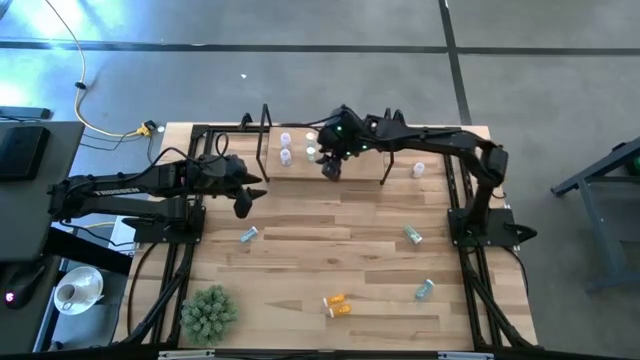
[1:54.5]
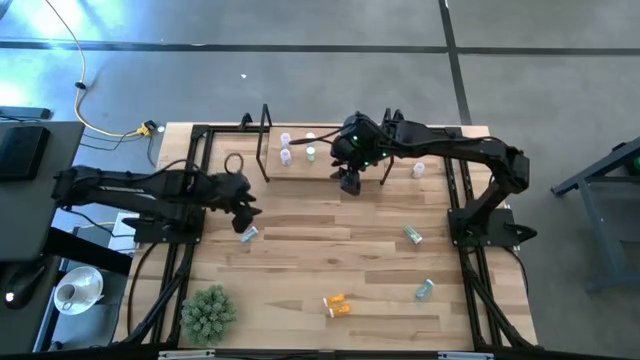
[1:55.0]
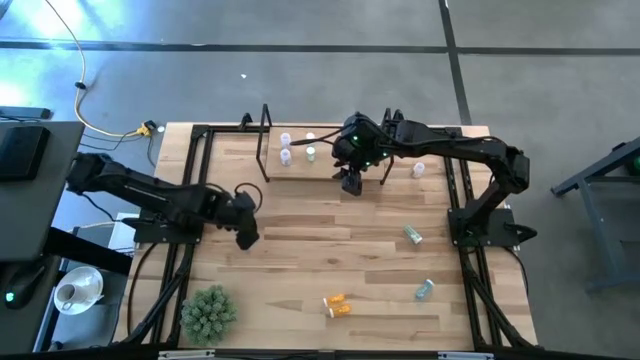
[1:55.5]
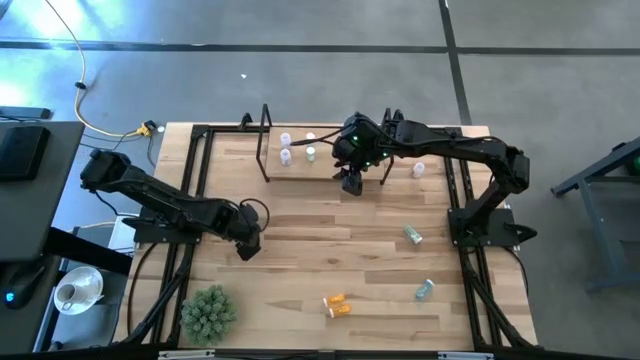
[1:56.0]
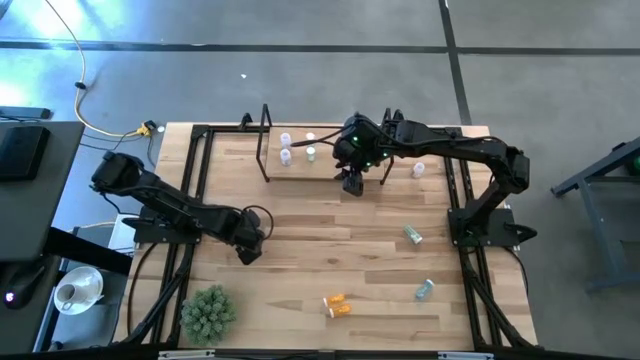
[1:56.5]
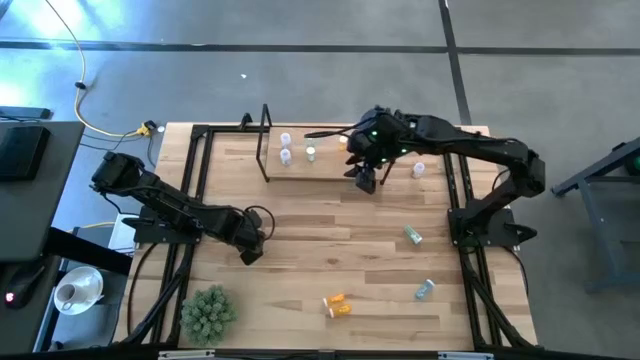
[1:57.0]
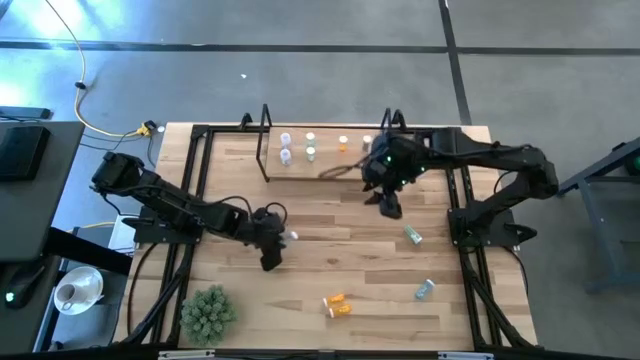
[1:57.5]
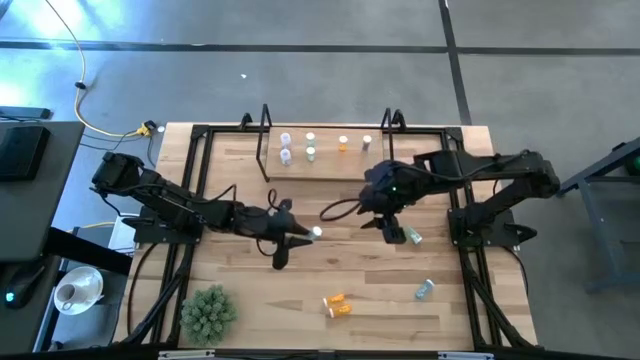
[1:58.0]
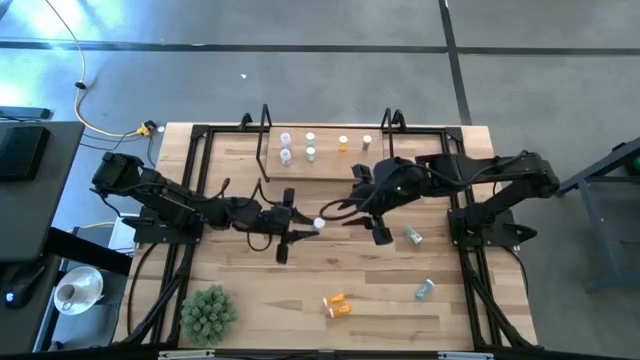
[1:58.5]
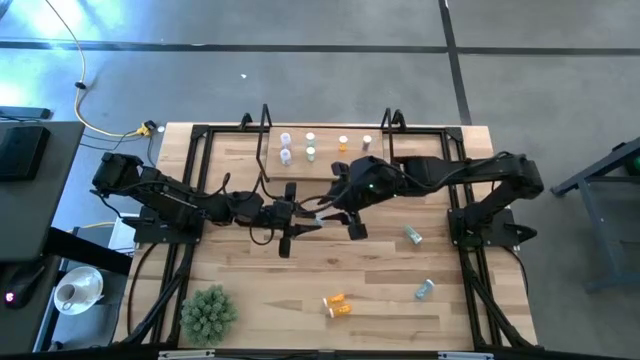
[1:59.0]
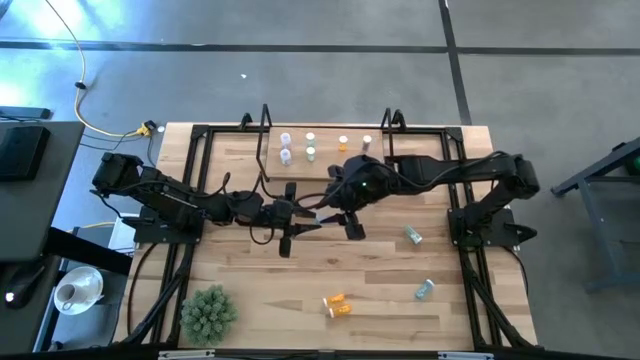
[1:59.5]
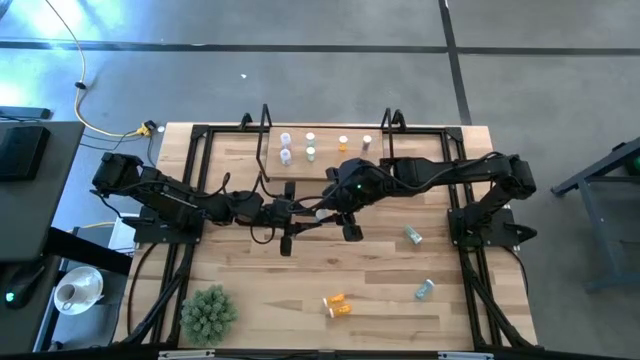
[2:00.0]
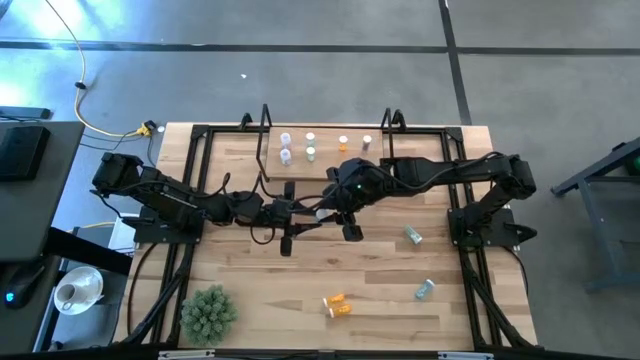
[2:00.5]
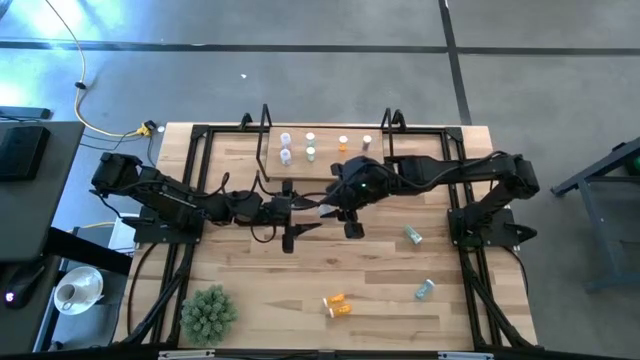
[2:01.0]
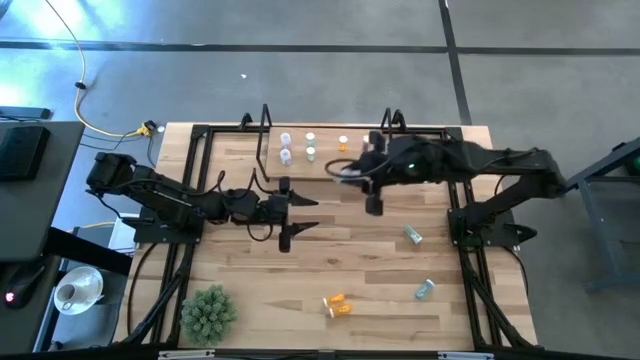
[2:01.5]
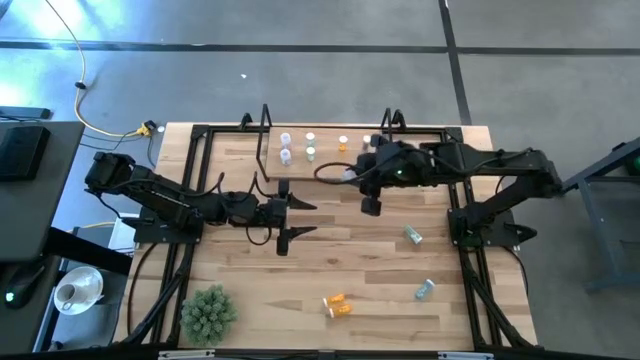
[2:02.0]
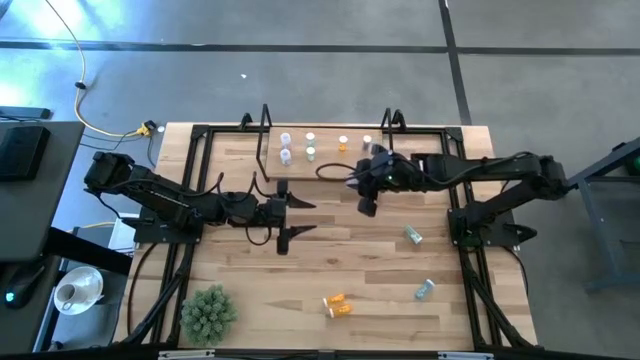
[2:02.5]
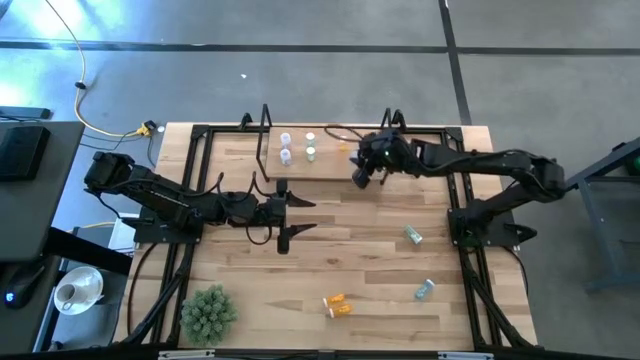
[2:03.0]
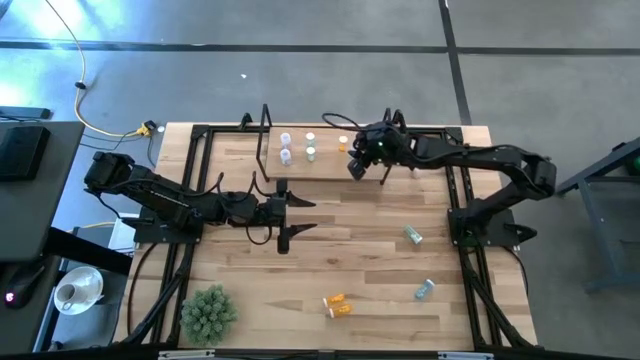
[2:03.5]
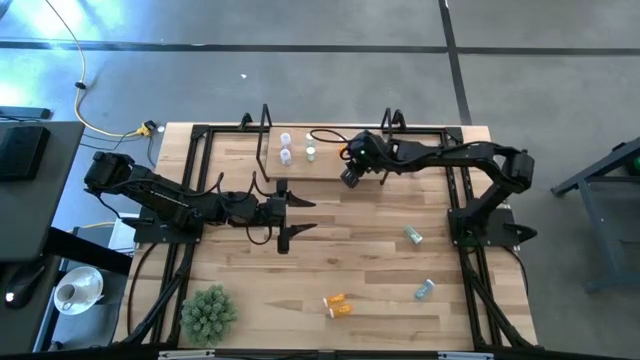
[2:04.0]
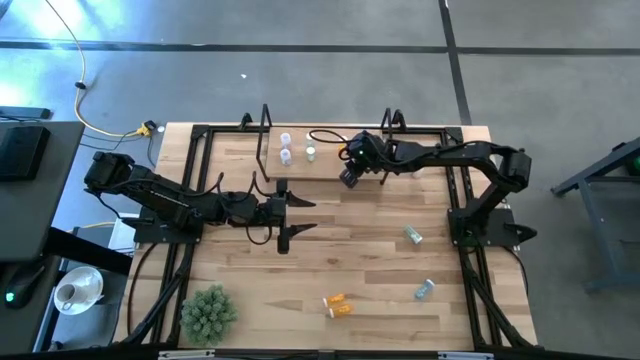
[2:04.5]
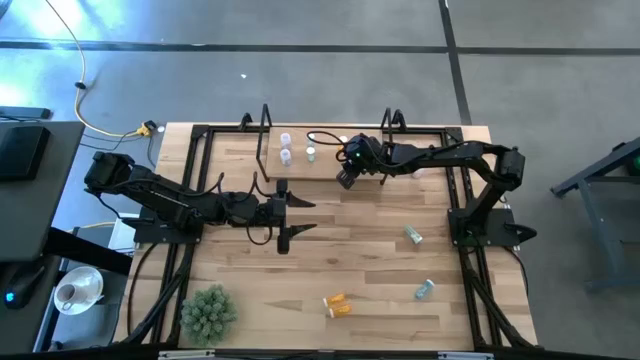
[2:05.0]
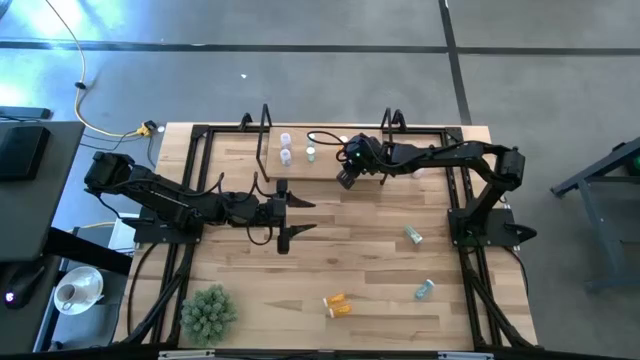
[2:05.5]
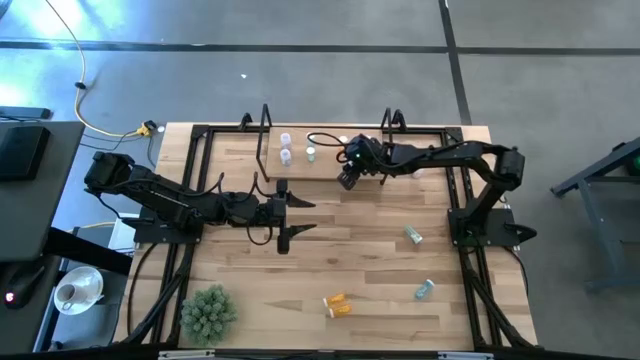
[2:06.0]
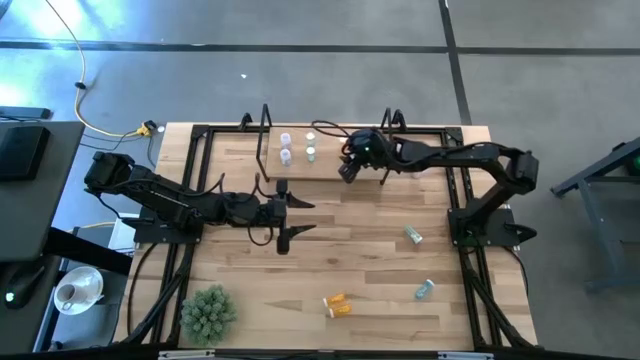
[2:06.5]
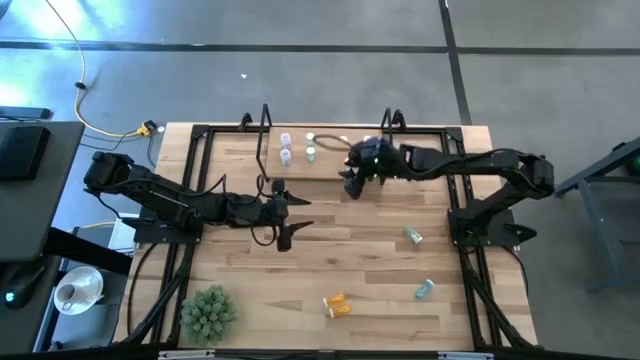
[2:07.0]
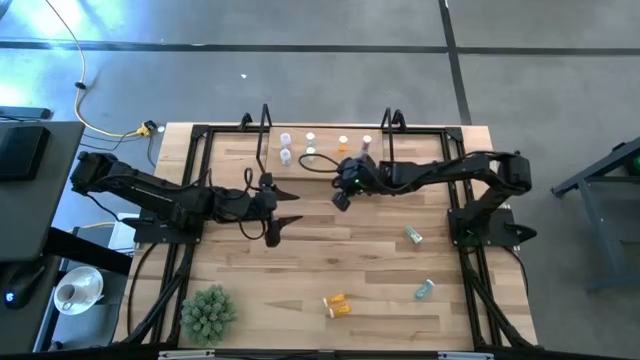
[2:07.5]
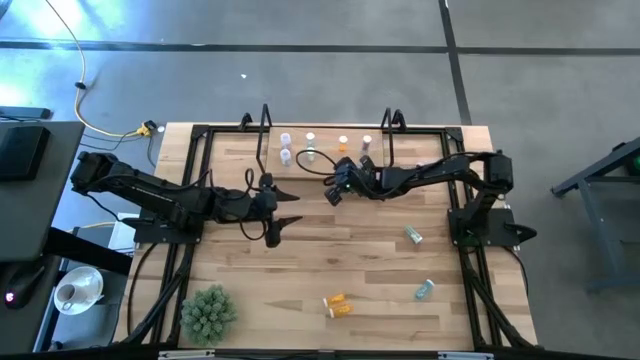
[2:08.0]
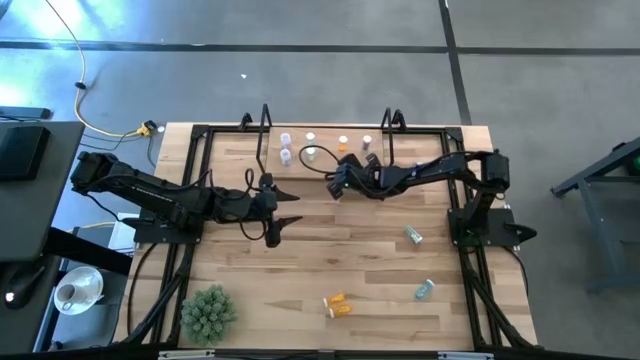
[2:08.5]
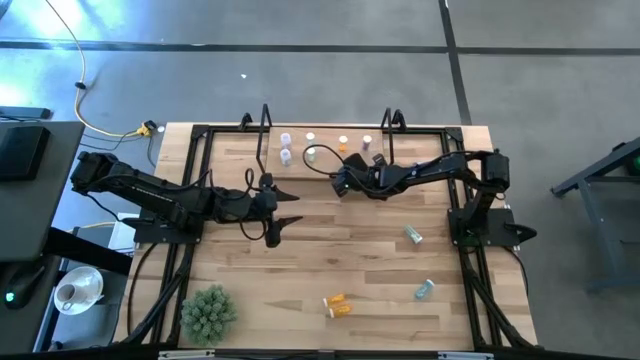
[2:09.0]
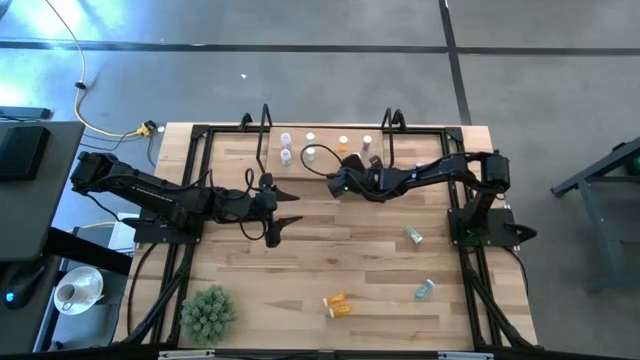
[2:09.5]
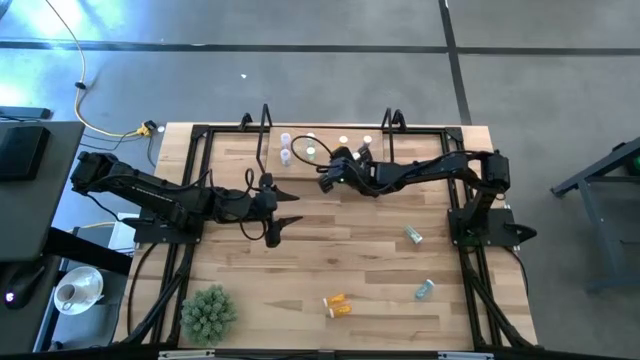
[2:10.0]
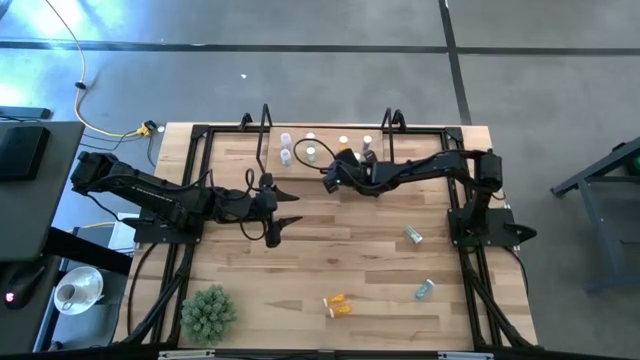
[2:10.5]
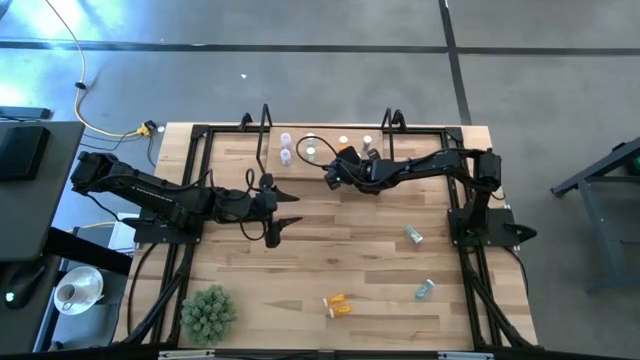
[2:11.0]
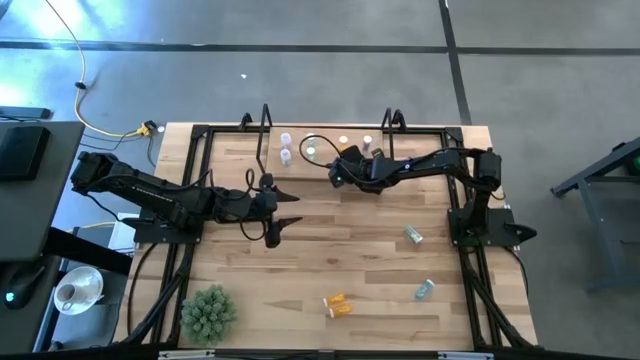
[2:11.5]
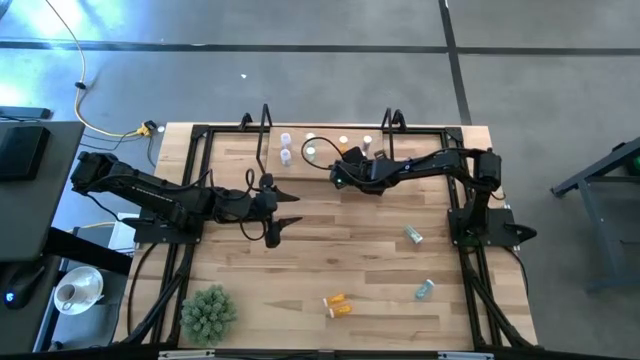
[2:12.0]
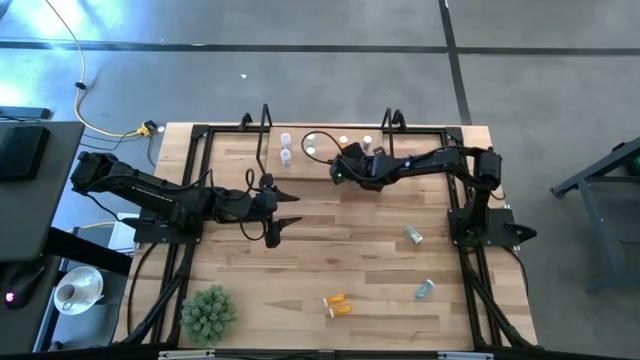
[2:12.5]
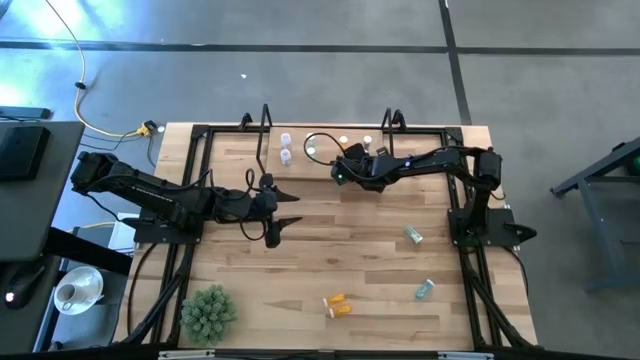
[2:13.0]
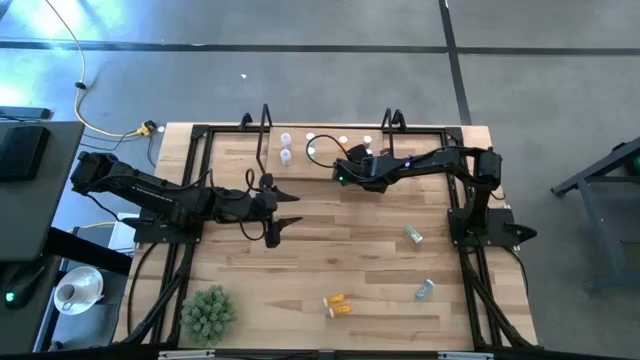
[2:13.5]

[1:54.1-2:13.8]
Task: Pick and place medicine bottles onto shelf by color
Put the top blue pill bottle on the shelf aligned with the other blue pill bottle
